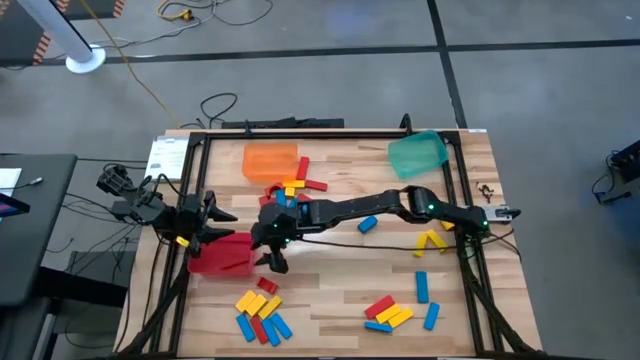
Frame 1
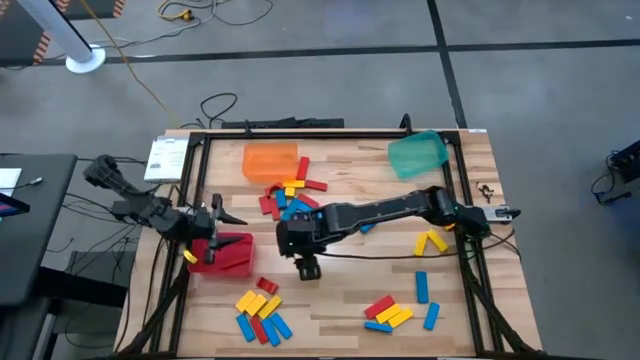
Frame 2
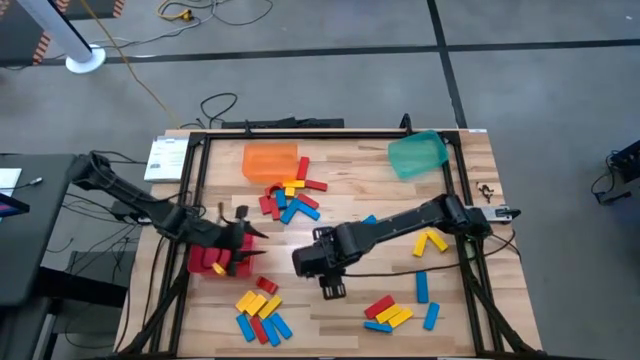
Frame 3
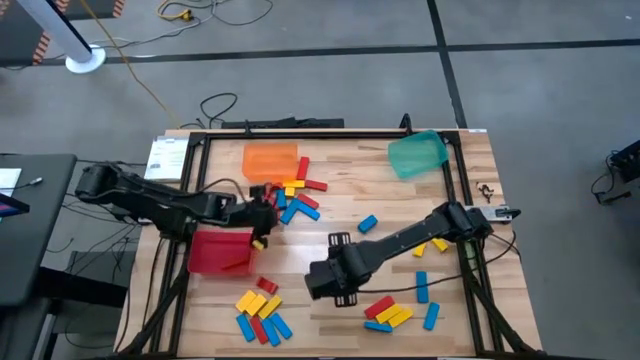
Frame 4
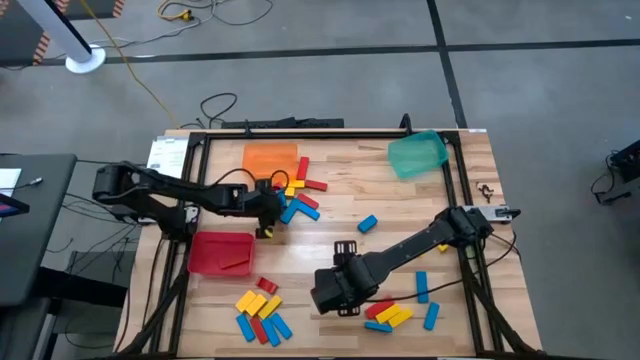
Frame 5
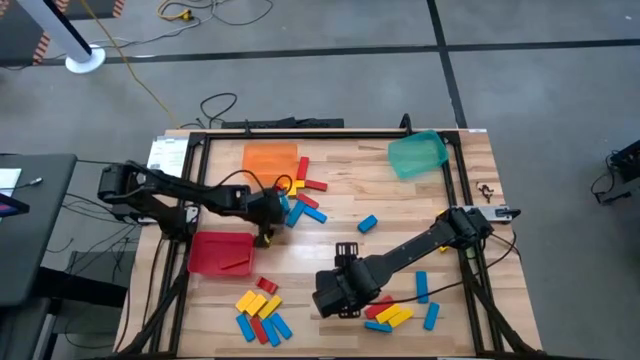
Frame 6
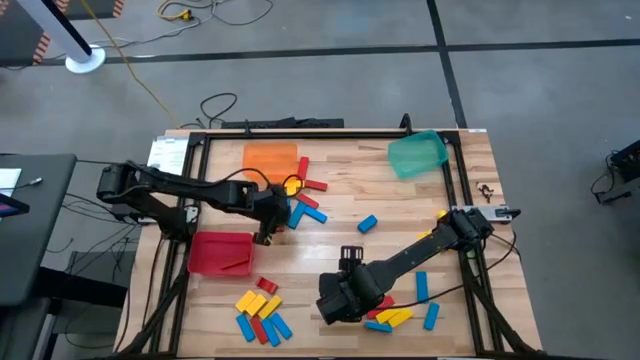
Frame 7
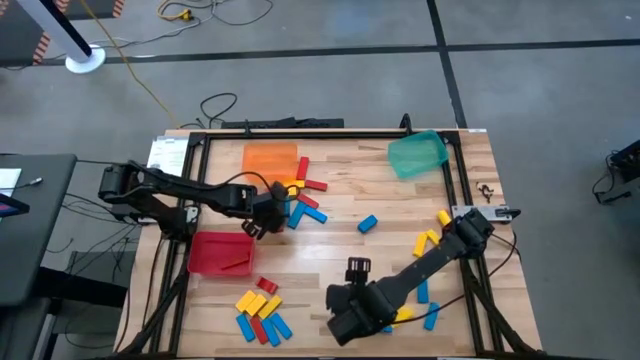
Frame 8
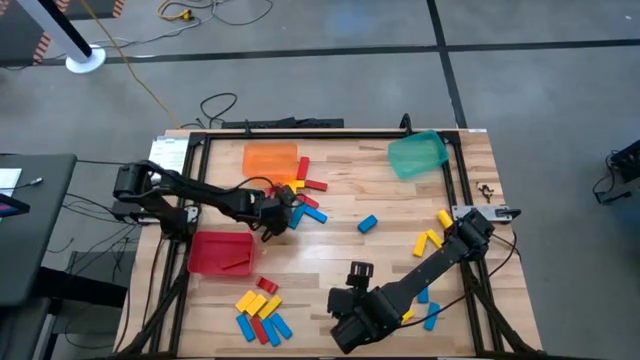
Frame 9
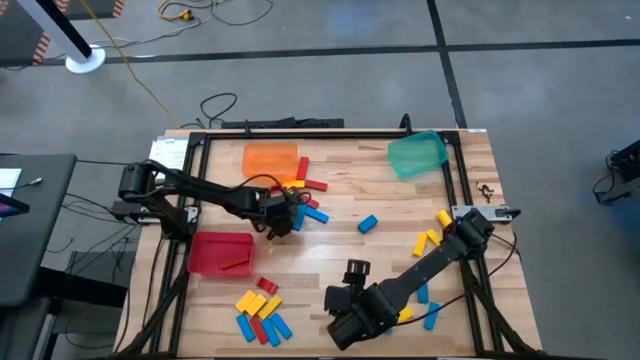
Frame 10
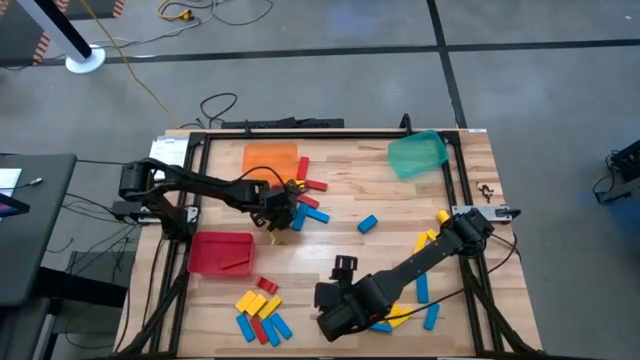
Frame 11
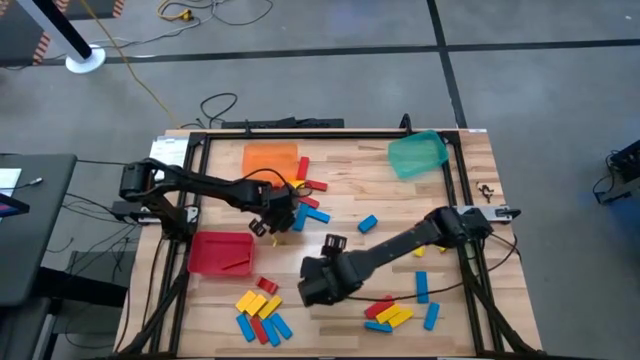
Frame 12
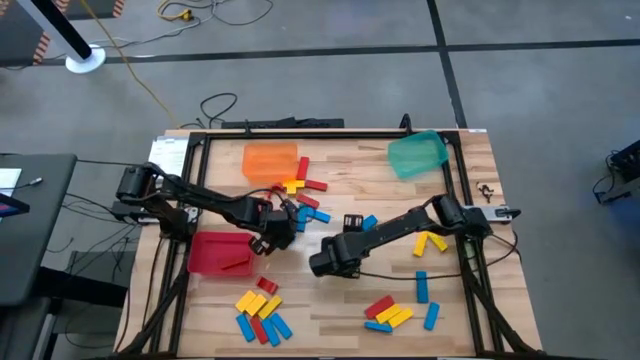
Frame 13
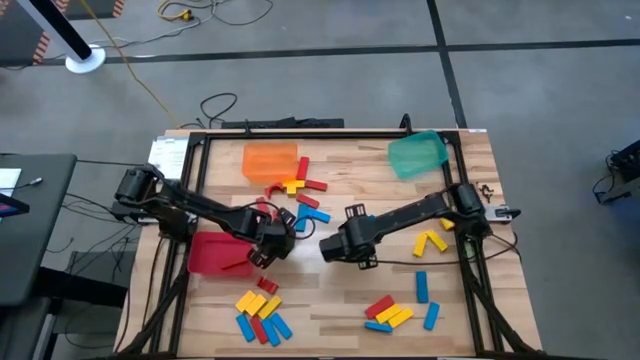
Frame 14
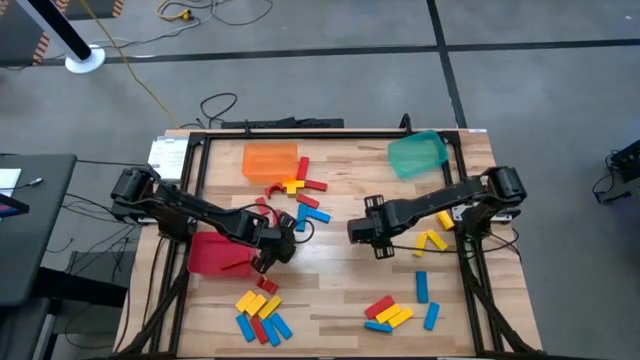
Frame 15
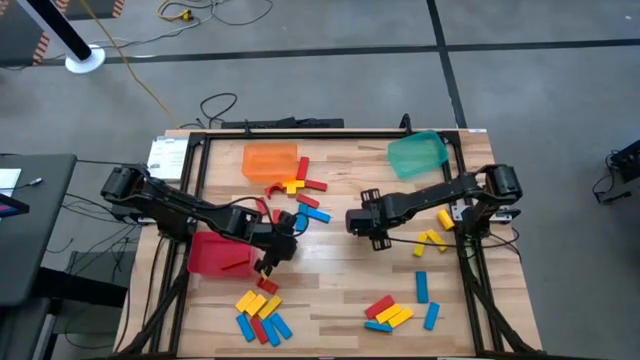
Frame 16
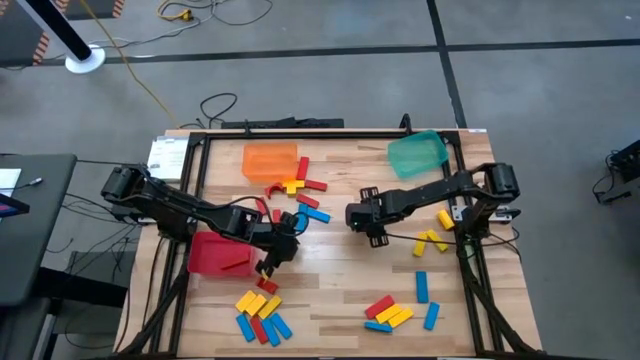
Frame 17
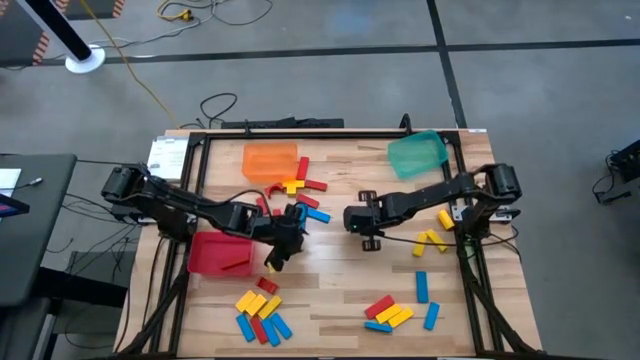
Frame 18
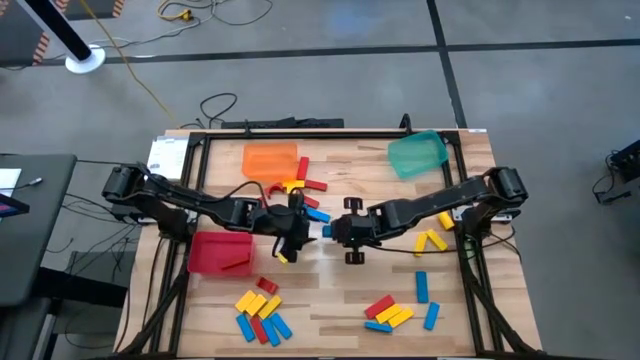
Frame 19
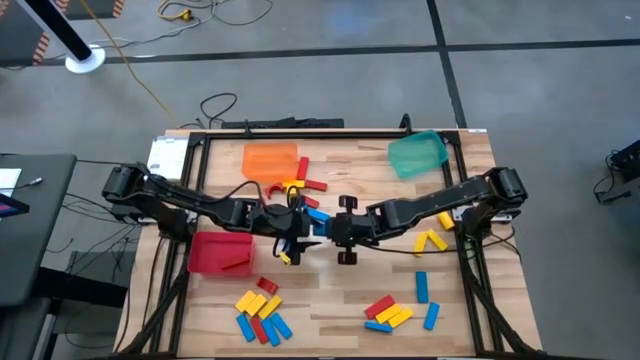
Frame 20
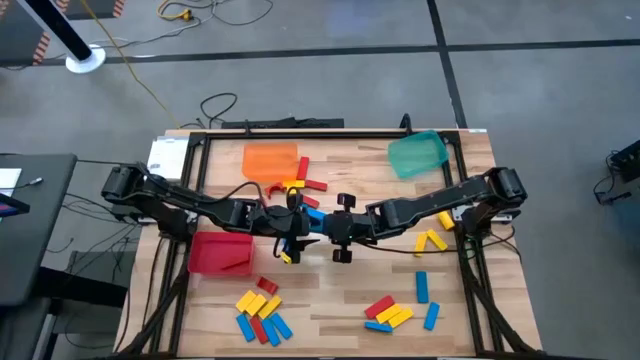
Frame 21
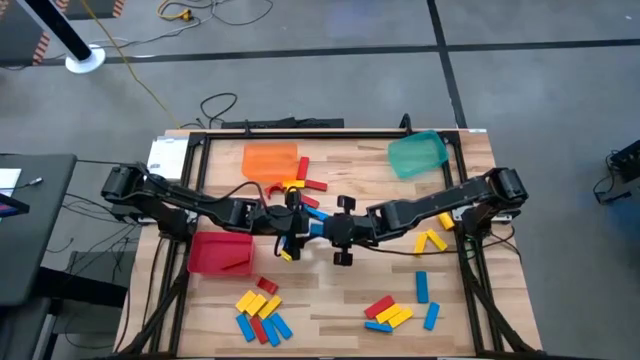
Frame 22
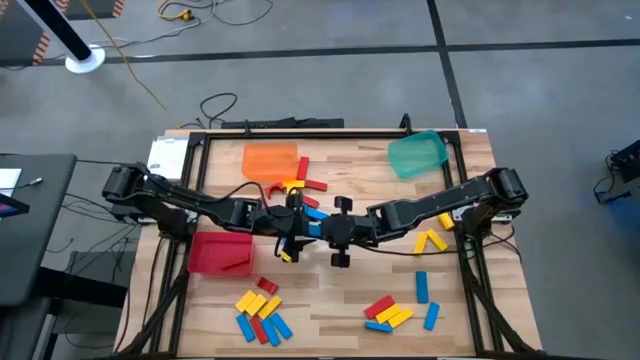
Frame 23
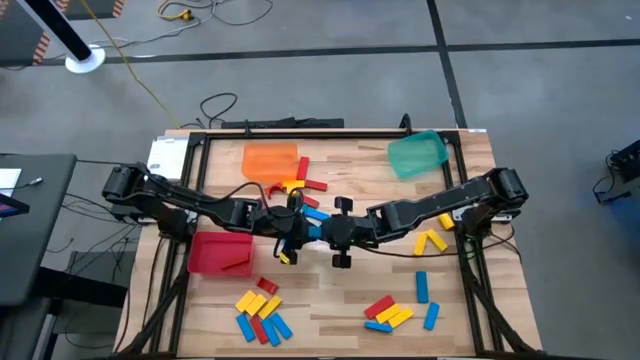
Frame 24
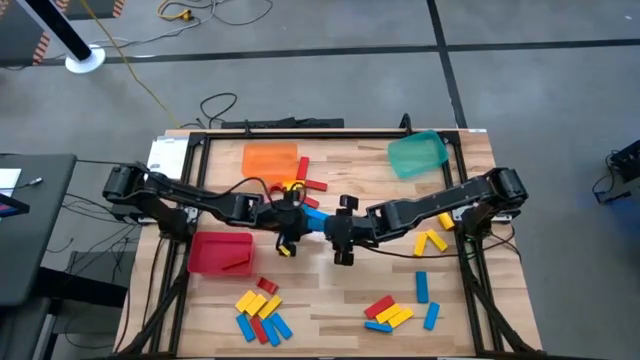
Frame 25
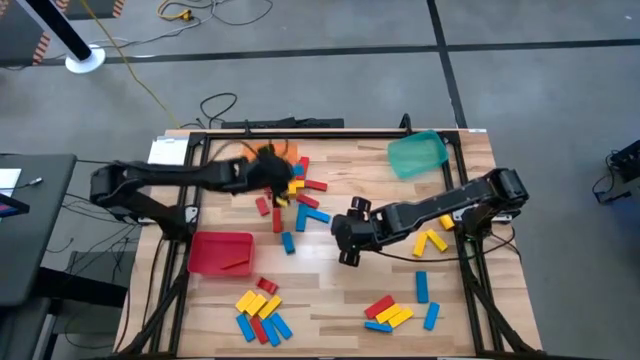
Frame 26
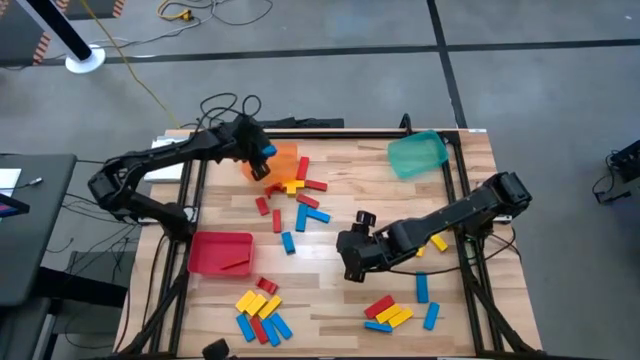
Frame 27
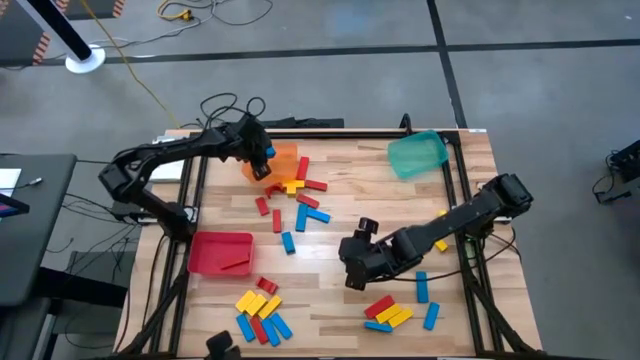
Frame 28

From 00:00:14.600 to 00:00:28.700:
Task: Sort blocks
Put the blue block into the orange bin

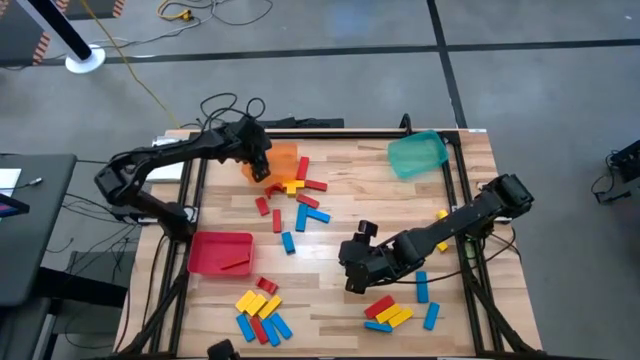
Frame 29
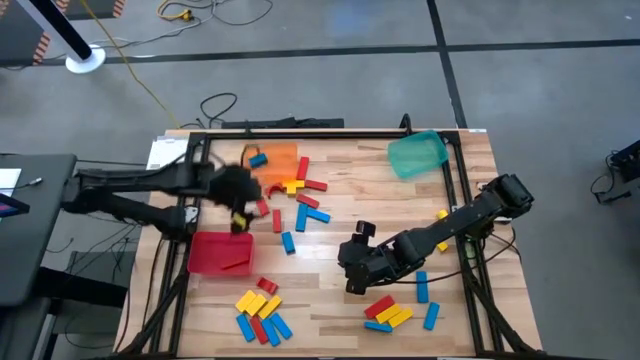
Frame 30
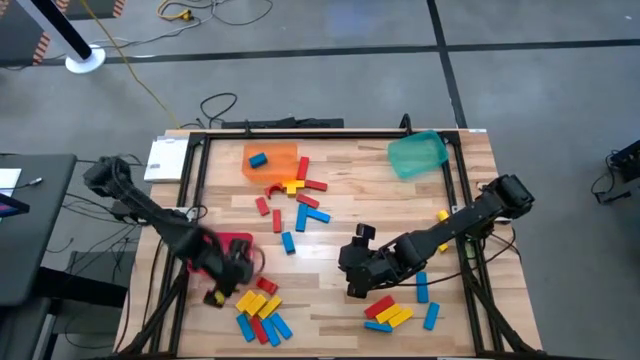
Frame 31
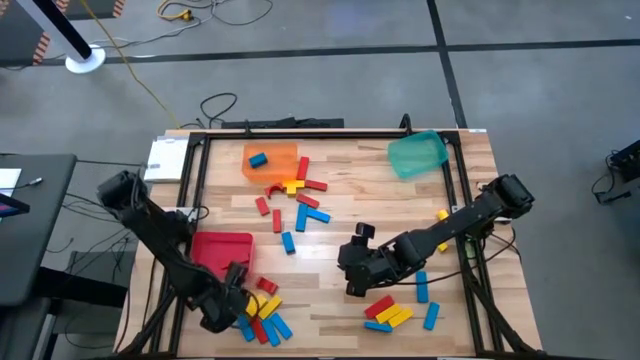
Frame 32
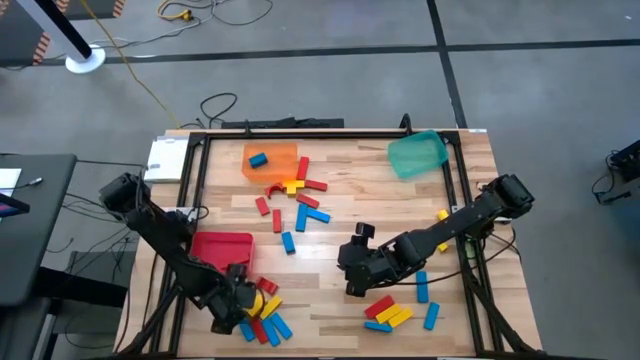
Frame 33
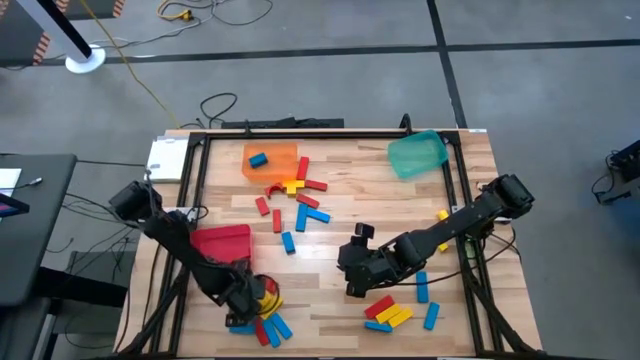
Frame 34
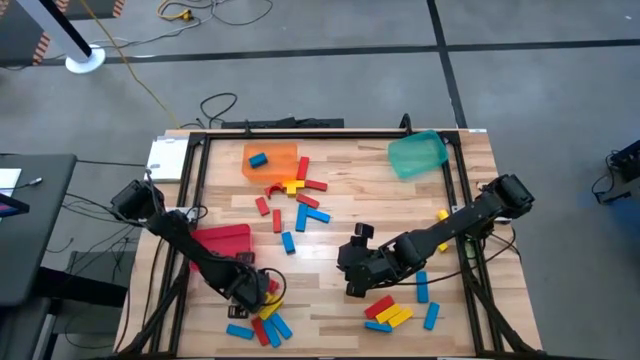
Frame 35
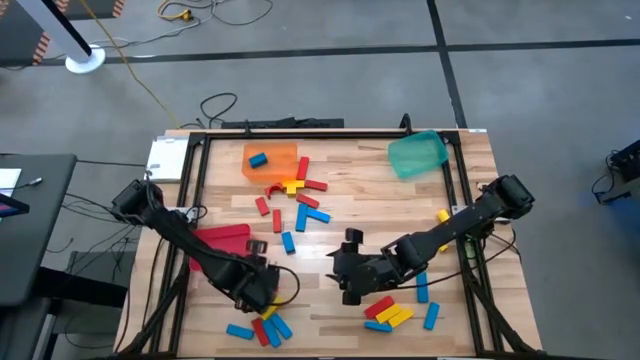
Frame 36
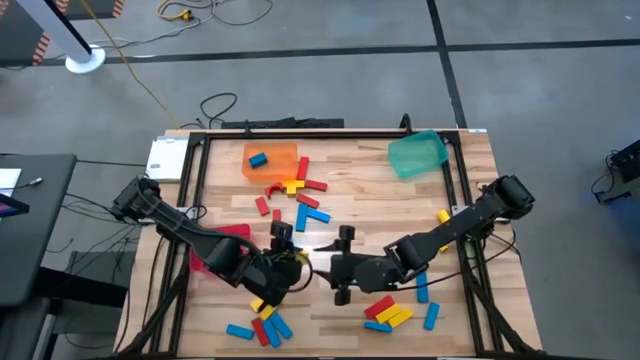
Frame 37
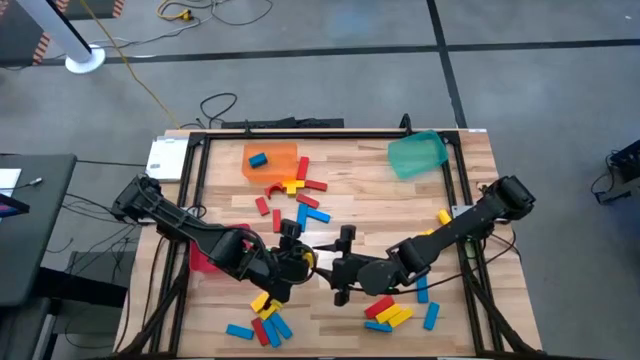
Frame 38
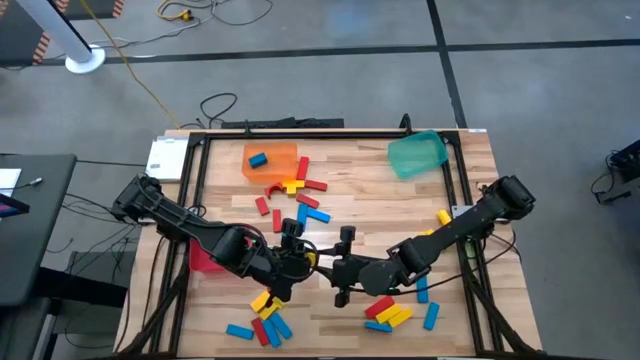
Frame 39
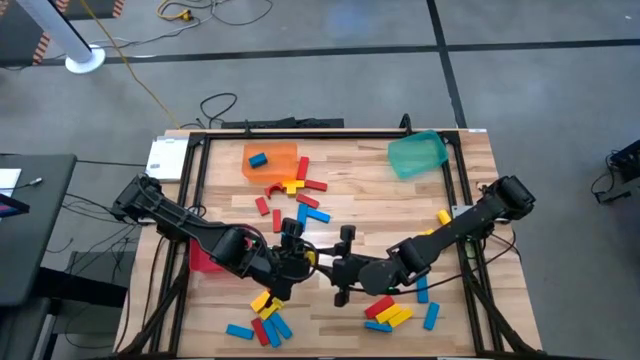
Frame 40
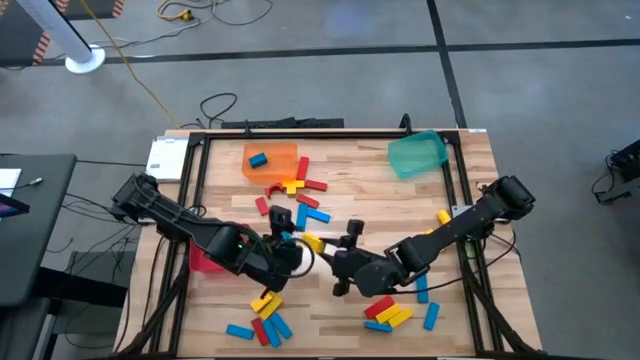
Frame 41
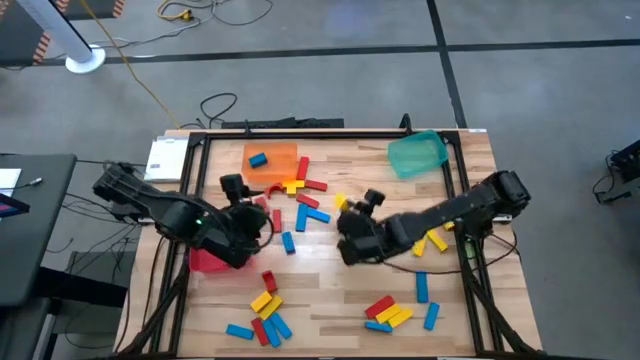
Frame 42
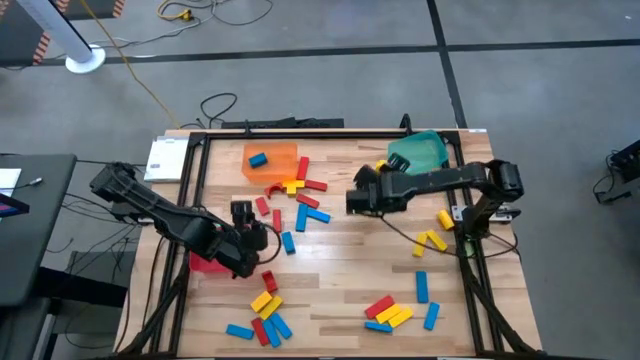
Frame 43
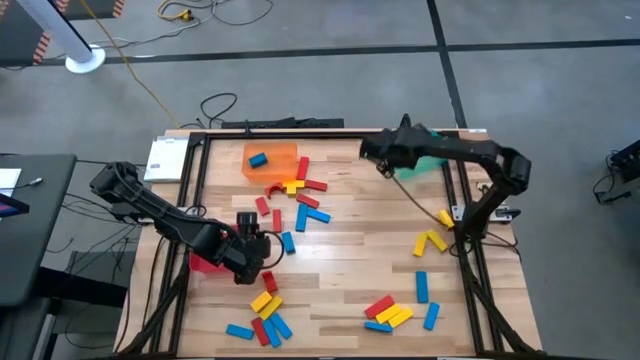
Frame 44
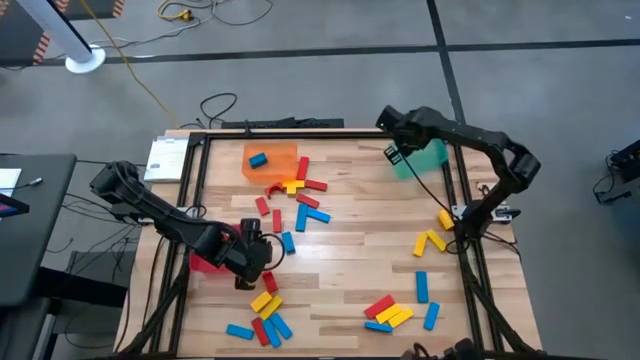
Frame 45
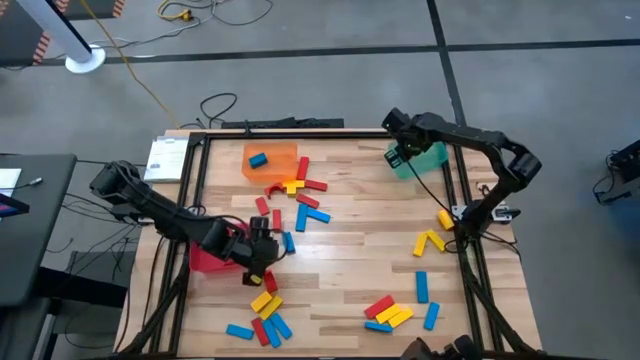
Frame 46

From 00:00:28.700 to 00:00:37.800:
Put the yellow block into the green bin
